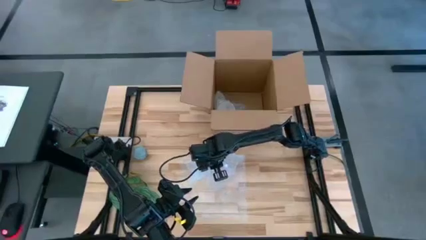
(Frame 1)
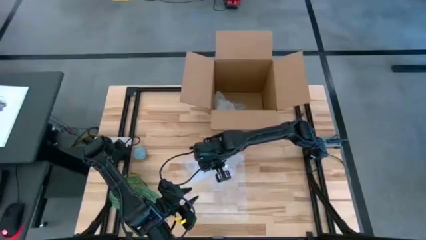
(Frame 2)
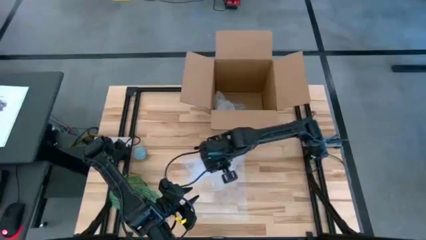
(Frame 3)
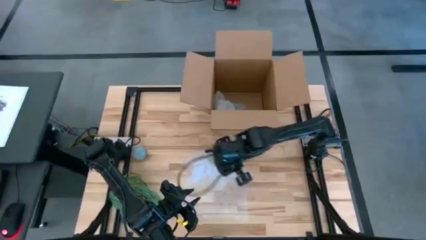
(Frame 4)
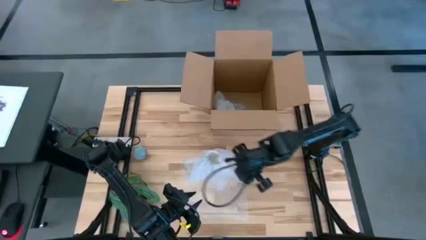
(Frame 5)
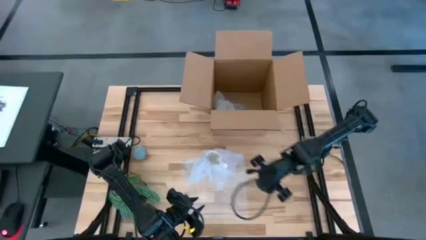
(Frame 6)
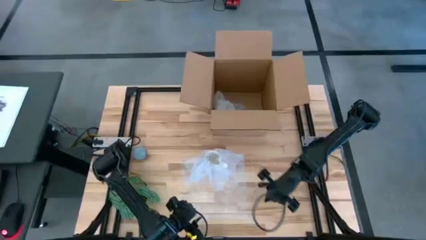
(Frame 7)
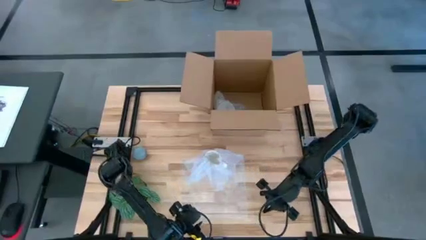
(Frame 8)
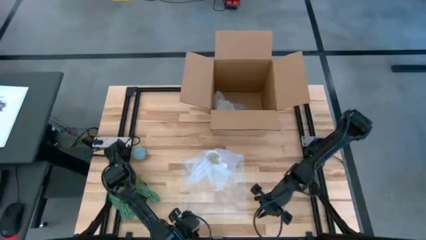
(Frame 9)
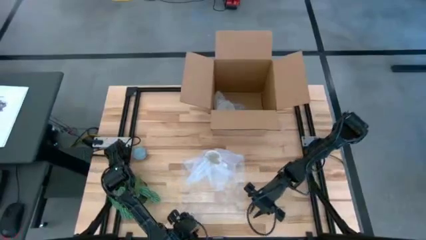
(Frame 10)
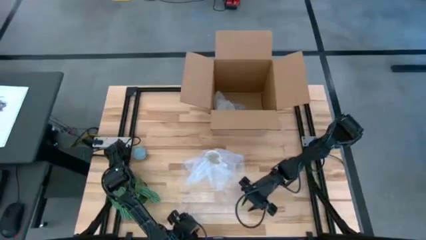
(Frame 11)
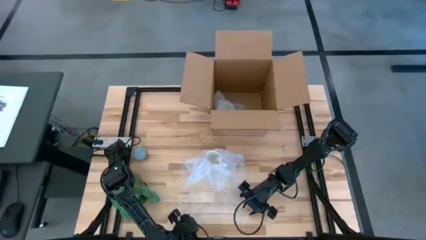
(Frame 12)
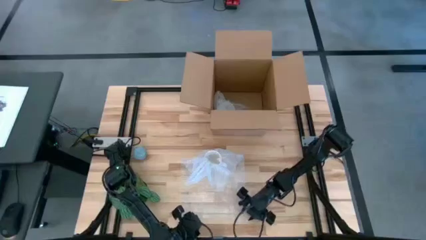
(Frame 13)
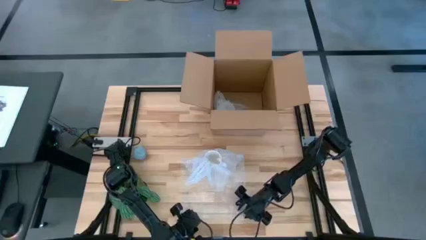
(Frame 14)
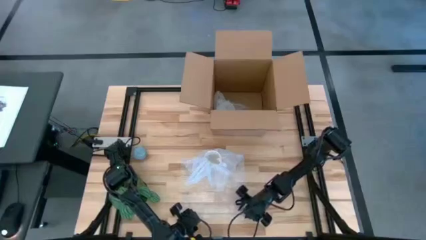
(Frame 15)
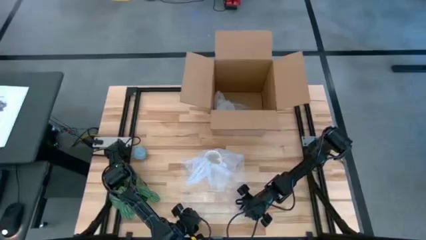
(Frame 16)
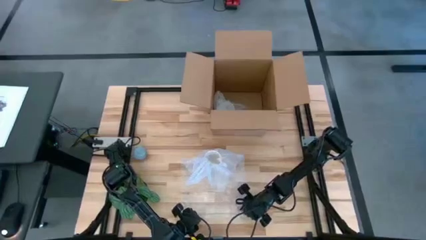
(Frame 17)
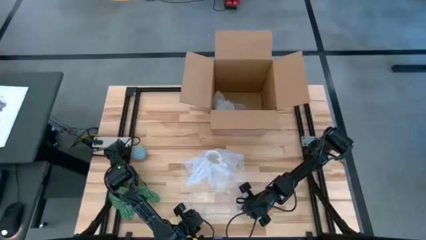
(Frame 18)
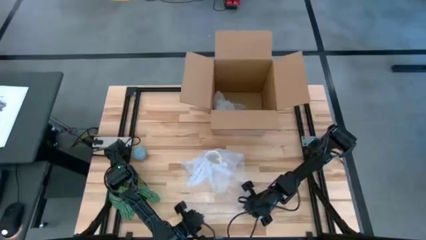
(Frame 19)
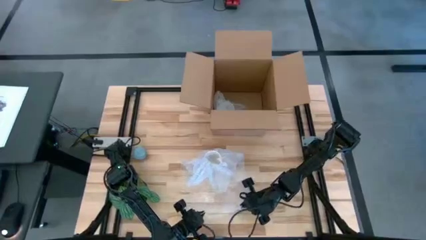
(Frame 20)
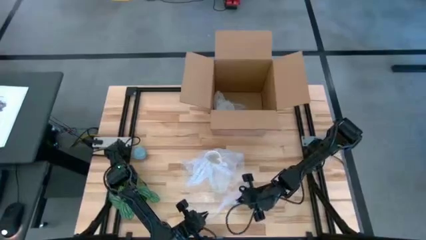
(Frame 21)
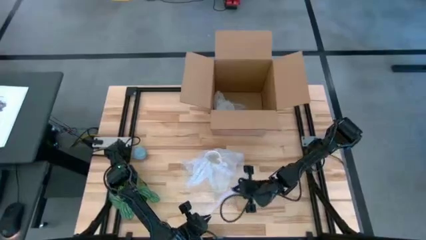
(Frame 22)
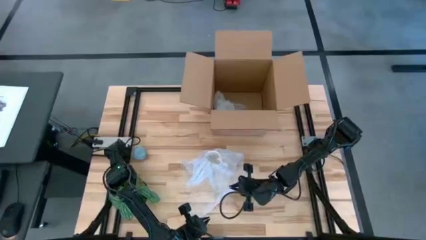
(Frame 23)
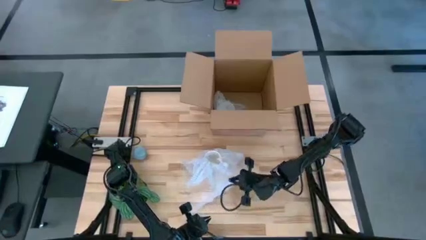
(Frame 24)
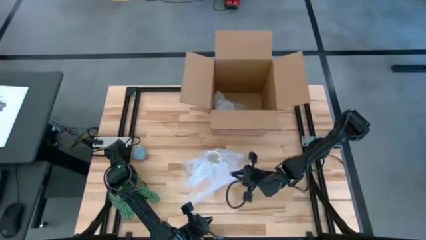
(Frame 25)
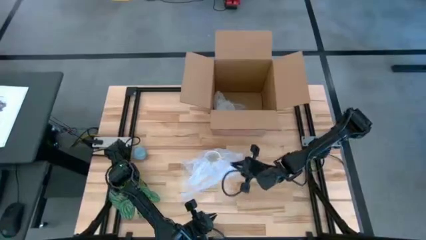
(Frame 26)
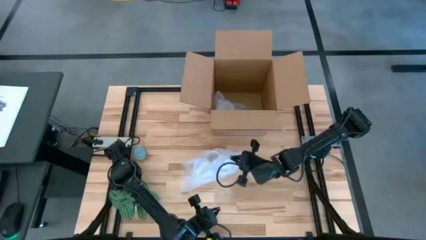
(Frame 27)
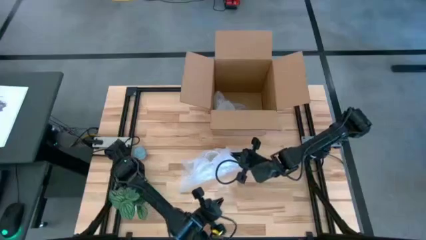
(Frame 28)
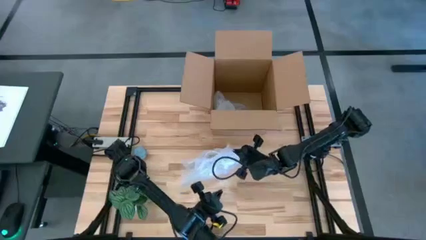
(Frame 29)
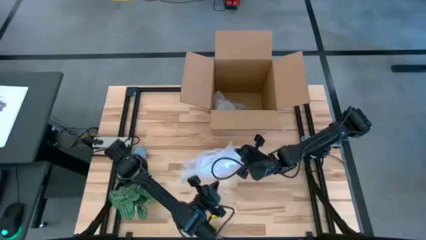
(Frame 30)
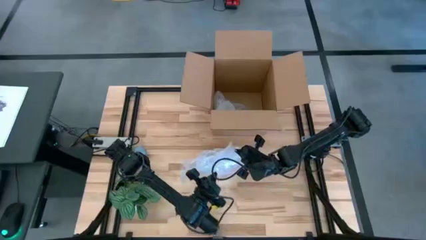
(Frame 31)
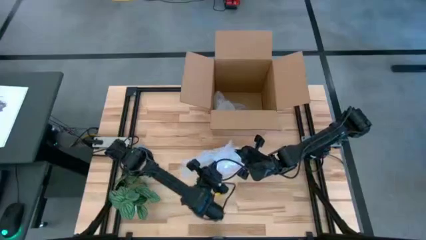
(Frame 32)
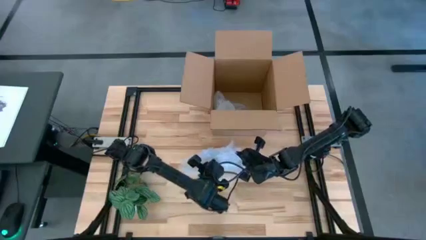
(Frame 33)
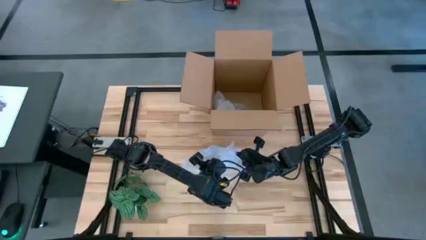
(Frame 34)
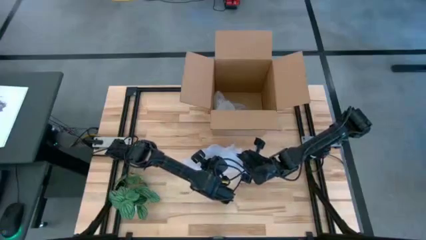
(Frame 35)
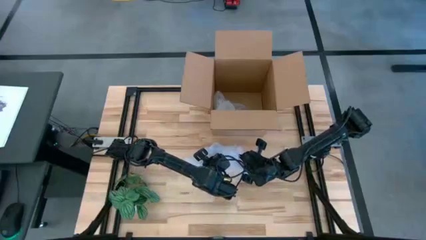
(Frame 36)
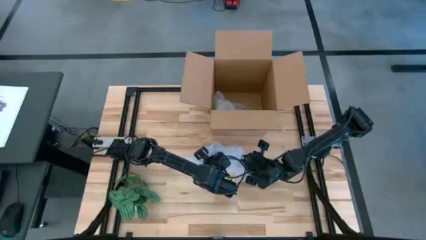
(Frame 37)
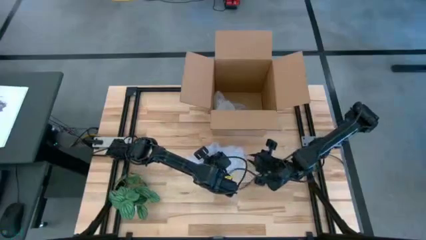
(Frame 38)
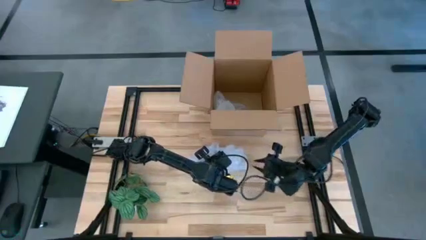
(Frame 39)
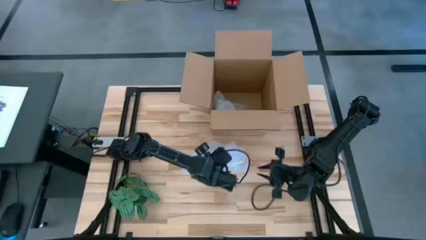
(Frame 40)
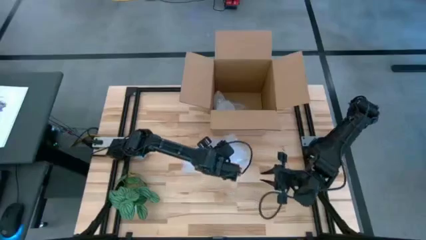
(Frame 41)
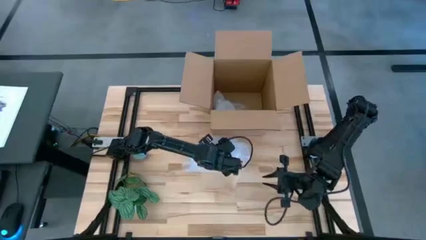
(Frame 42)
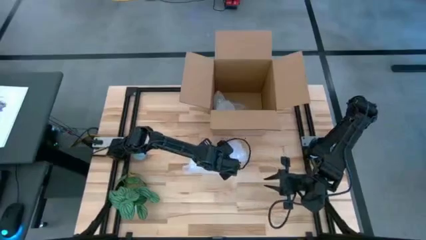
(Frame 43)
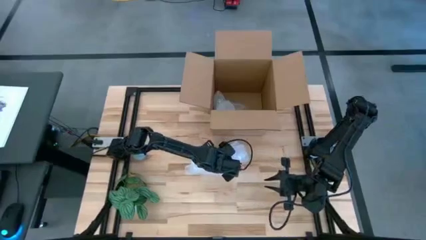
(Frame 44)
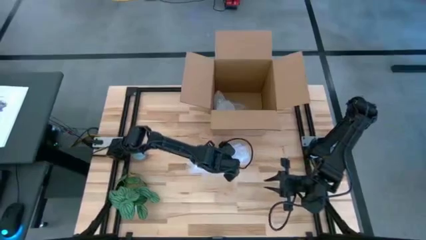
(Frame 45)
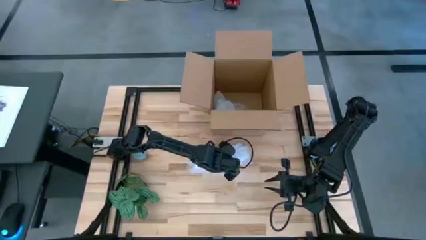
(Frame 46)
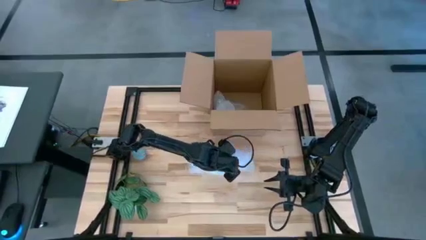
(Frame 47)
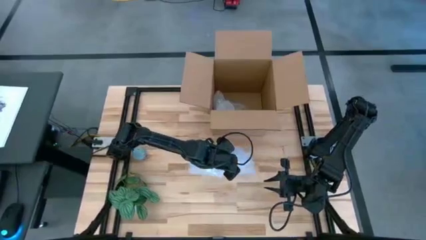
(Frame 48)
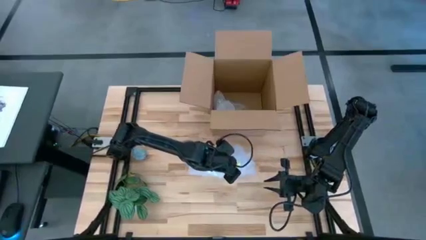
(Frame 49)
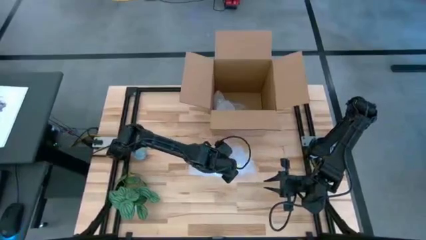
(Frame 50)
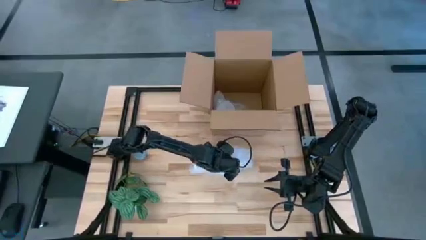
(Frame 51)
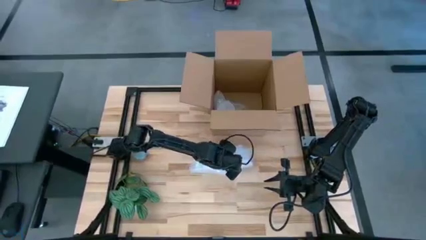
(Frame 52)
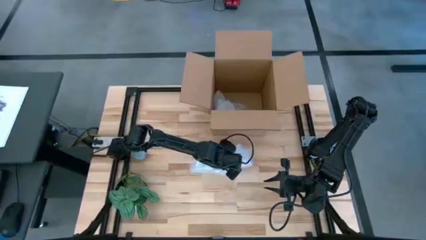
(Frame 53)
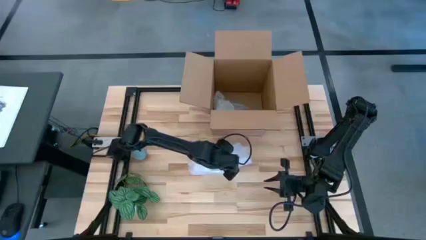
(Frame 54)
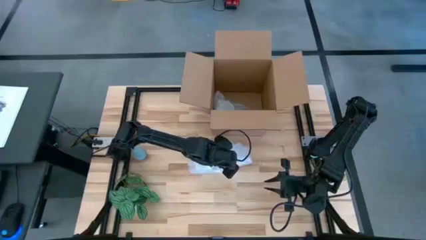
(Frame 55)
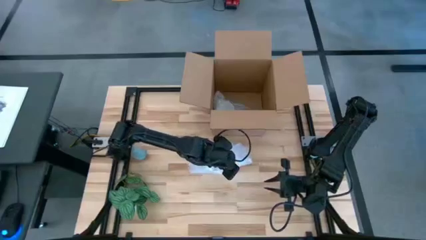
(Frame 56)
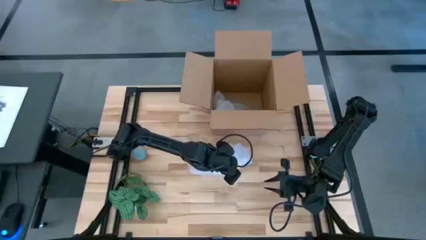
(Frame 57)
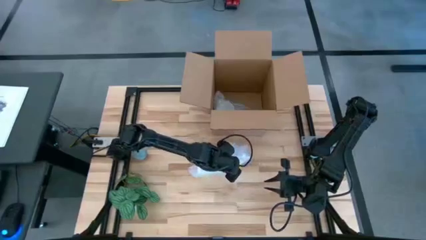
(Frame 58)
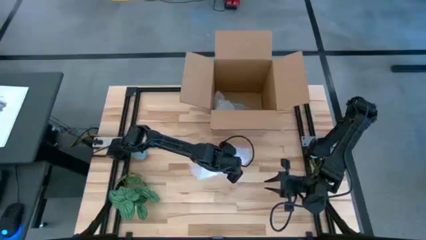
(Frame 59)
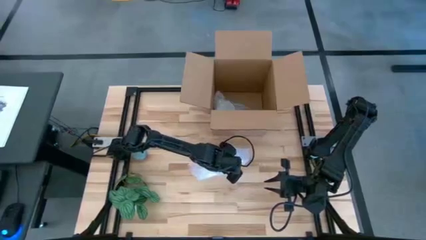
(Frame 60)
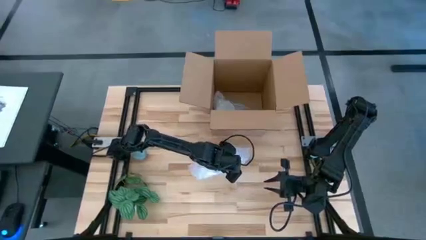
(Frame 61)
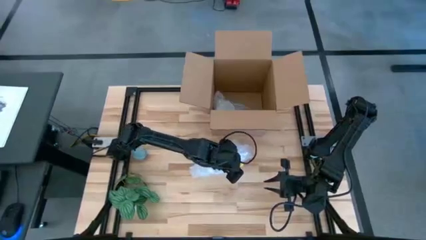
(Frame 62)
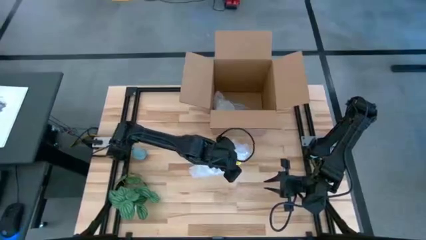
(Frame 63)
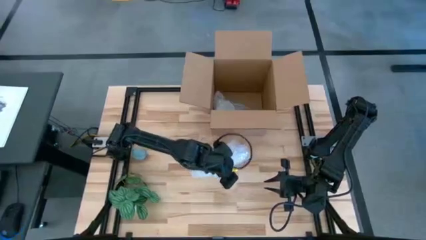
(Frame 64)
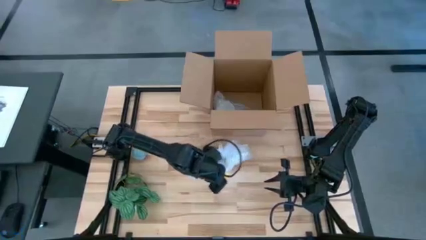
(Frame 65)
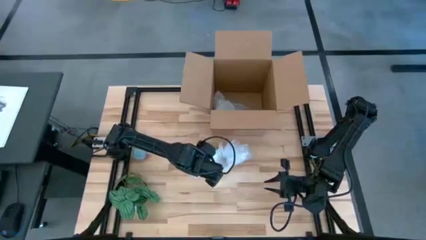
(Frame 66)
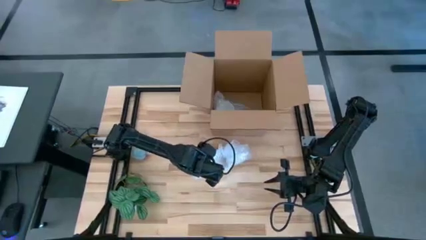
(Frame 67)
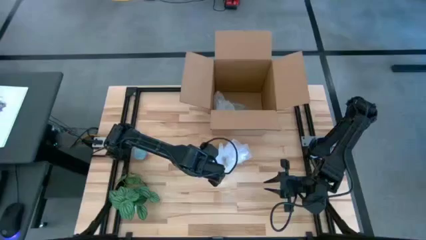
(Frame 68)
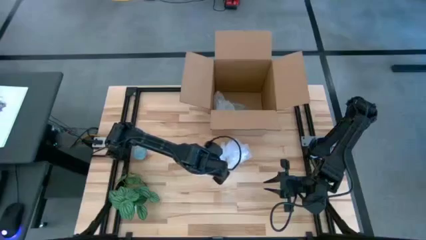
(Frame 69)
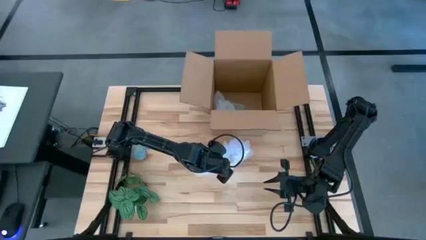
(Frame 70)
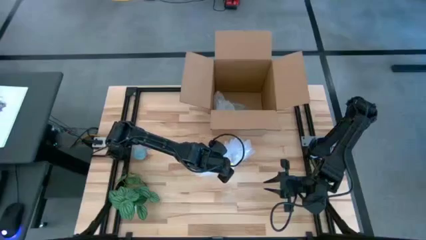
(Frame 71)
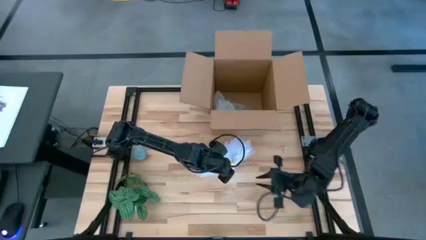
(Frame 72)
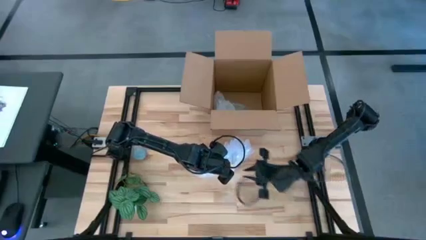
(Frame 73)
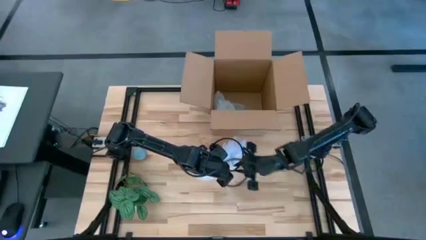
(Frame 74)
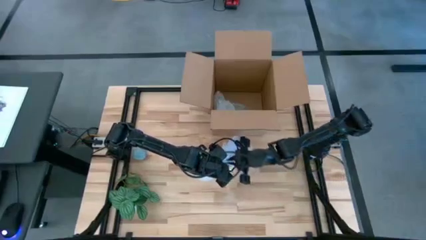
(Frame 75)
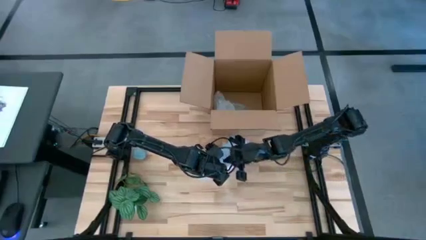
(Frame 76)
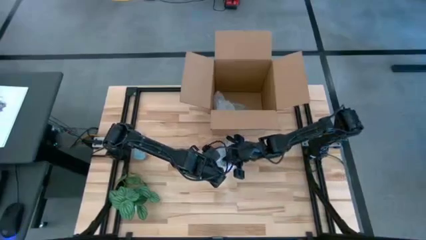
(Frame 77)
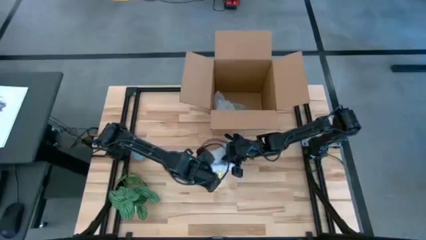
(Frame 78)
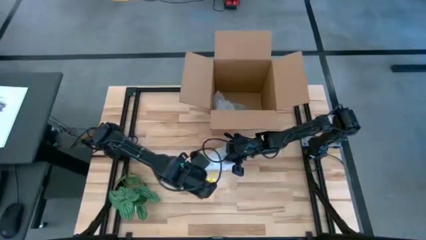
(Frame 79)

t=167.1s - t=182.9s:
Task: wrap mug
Wrap the white gray mug with bubble wrap
